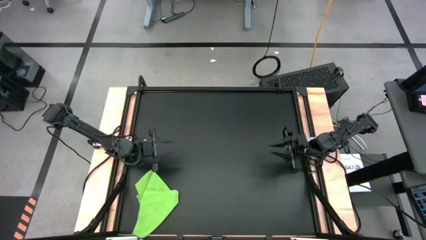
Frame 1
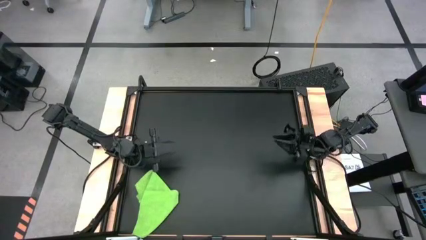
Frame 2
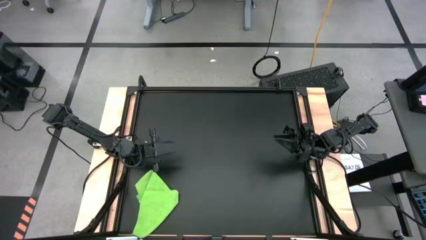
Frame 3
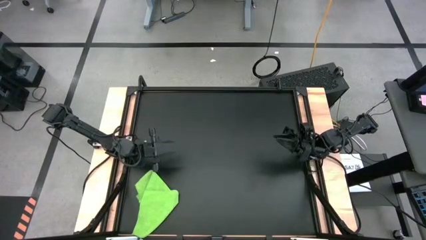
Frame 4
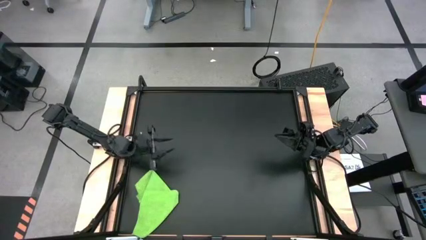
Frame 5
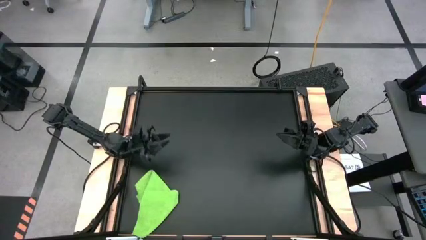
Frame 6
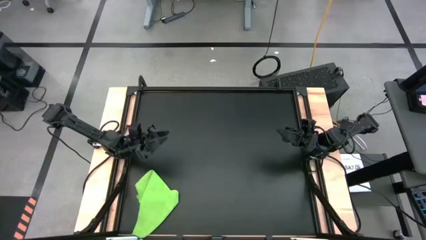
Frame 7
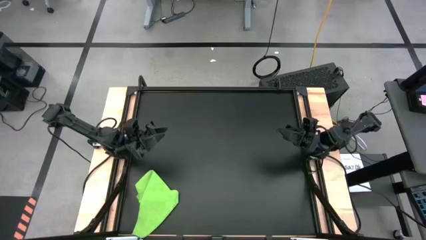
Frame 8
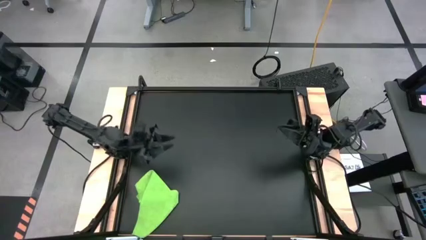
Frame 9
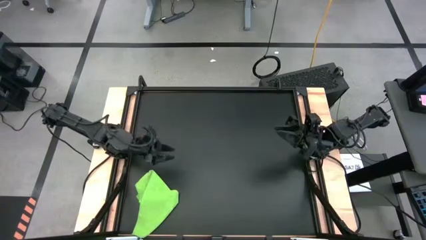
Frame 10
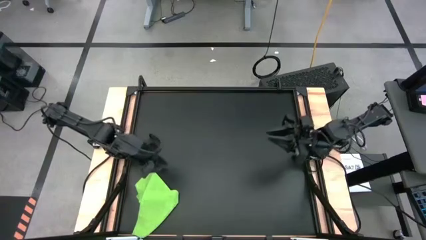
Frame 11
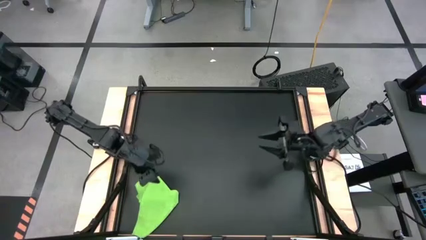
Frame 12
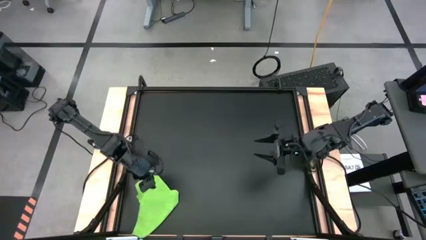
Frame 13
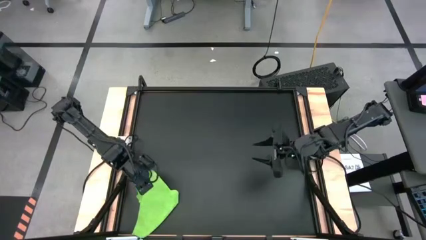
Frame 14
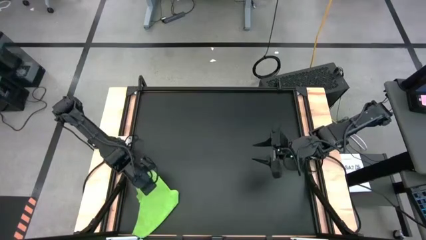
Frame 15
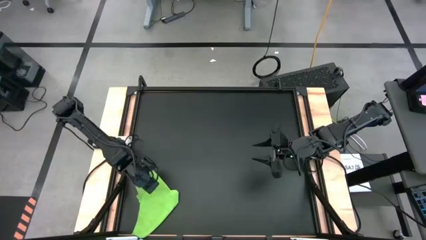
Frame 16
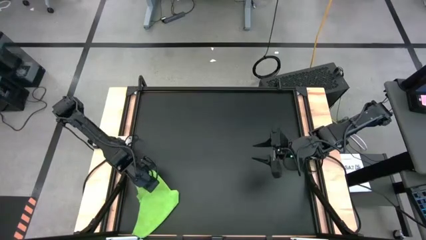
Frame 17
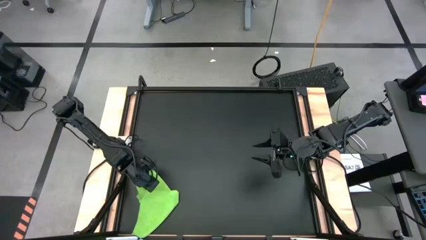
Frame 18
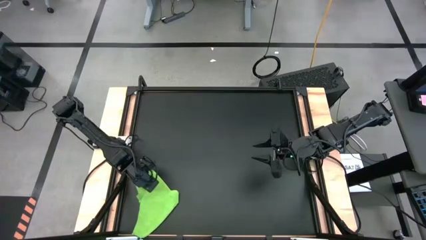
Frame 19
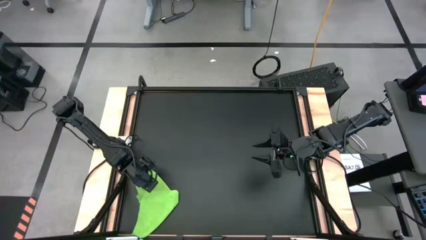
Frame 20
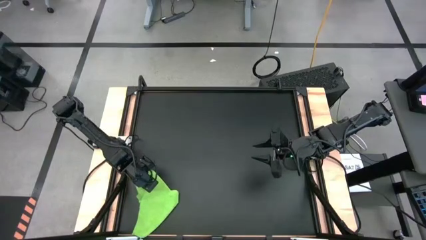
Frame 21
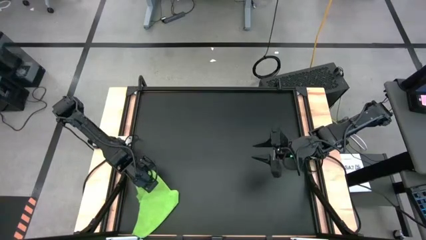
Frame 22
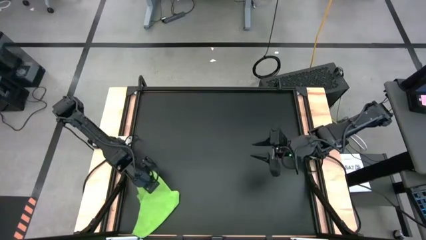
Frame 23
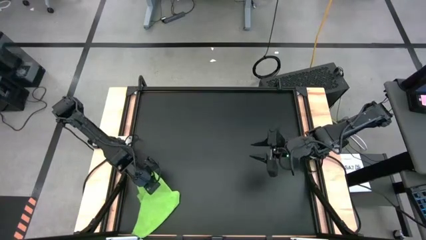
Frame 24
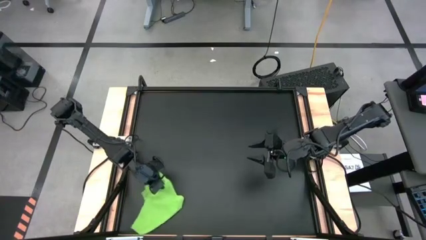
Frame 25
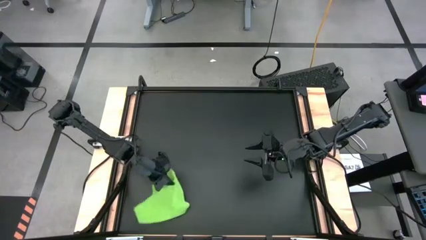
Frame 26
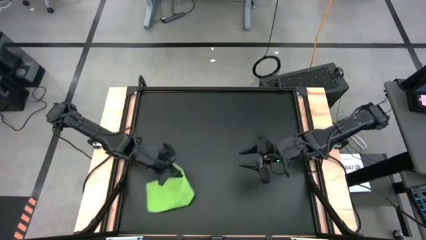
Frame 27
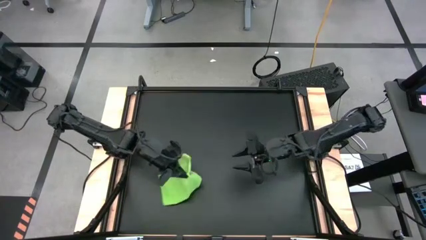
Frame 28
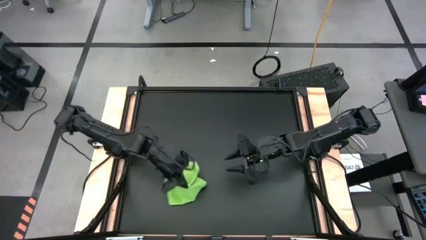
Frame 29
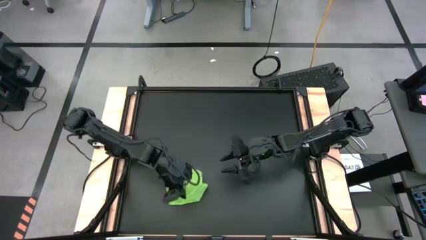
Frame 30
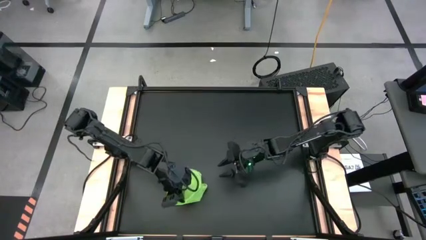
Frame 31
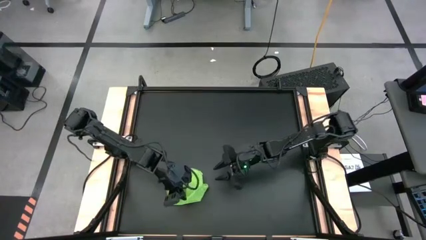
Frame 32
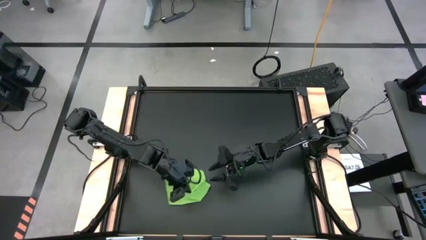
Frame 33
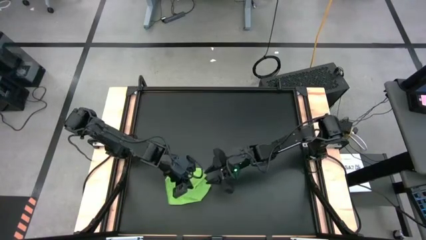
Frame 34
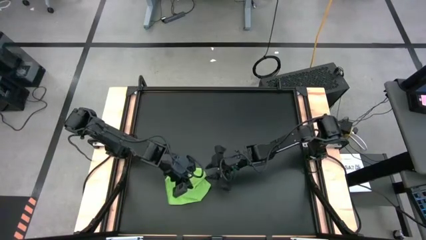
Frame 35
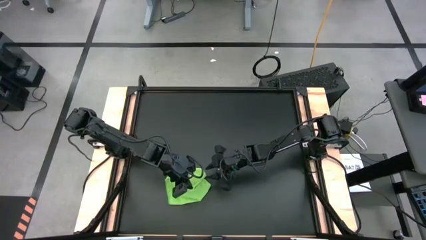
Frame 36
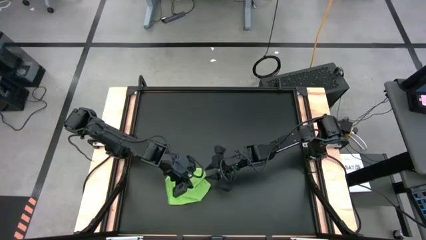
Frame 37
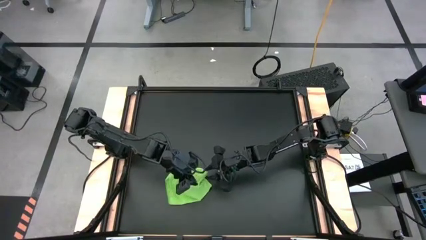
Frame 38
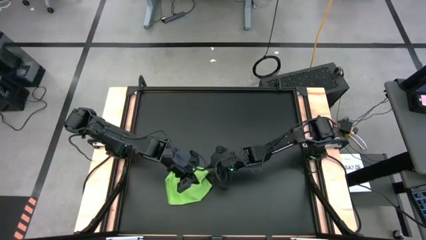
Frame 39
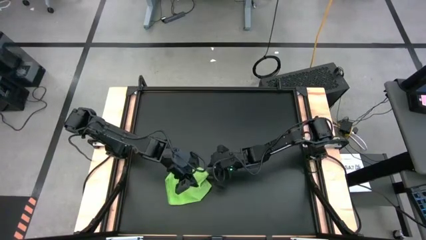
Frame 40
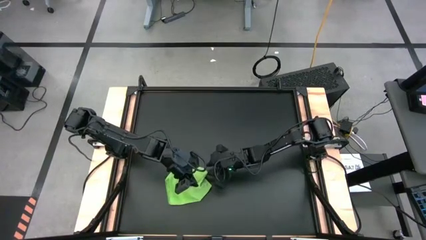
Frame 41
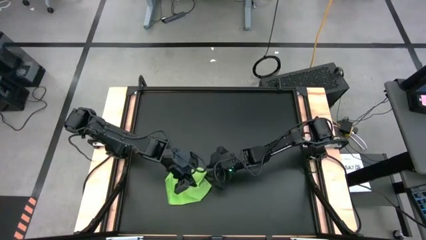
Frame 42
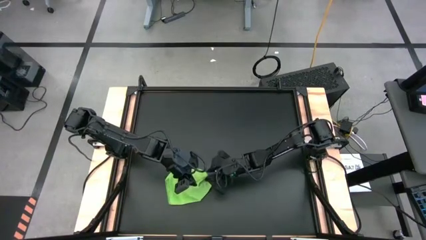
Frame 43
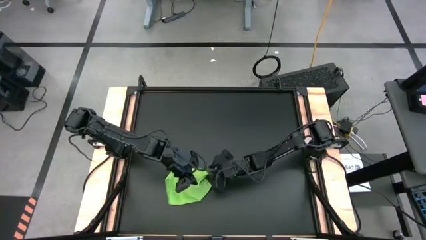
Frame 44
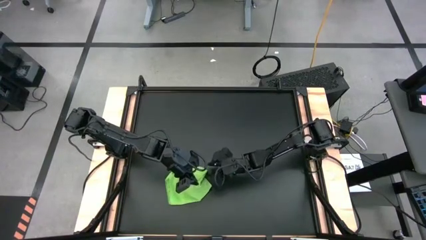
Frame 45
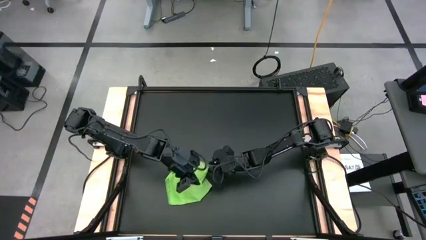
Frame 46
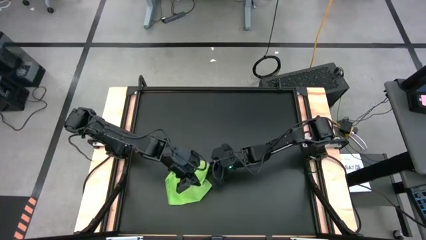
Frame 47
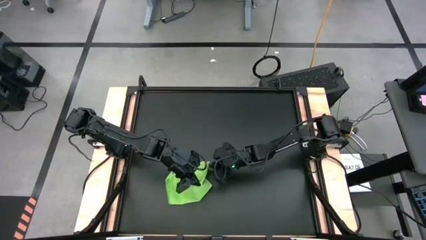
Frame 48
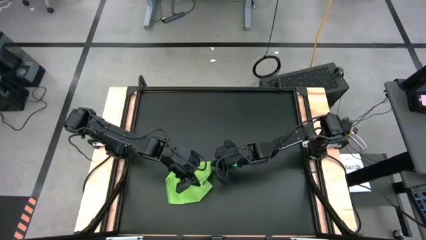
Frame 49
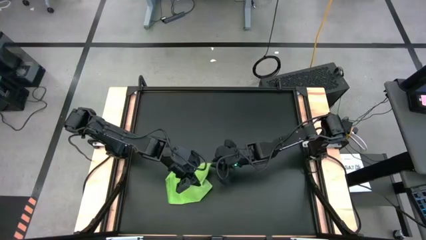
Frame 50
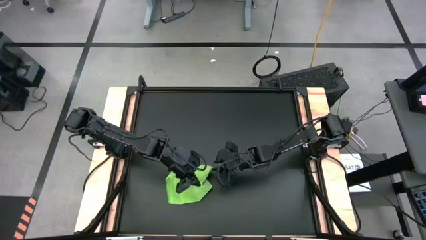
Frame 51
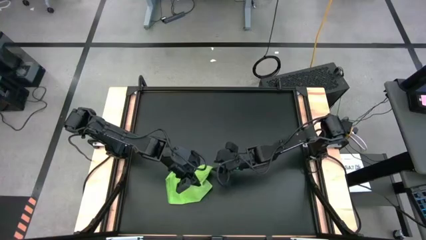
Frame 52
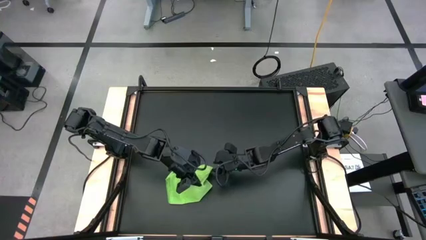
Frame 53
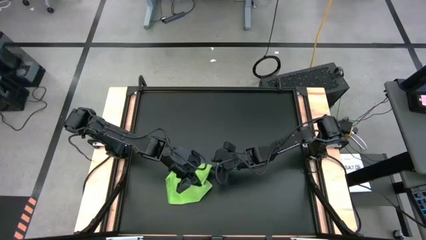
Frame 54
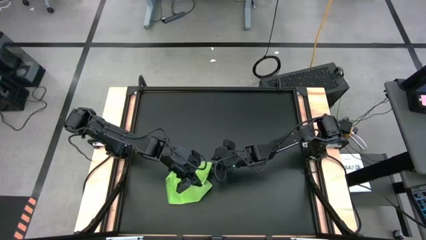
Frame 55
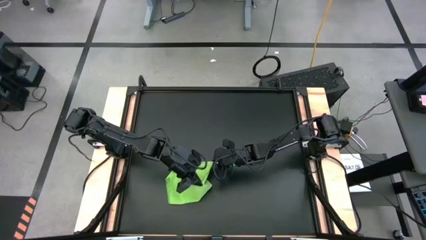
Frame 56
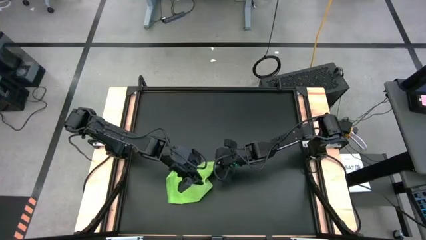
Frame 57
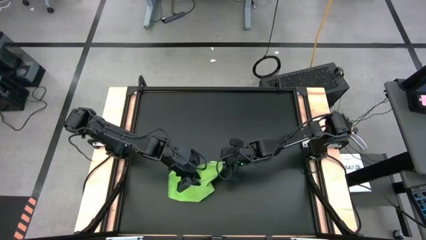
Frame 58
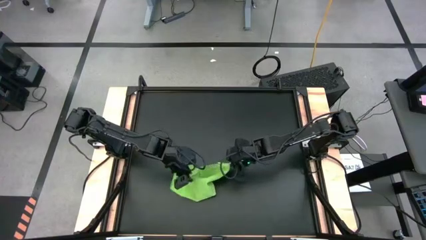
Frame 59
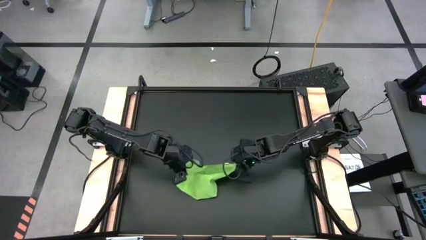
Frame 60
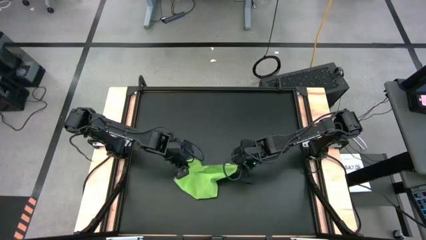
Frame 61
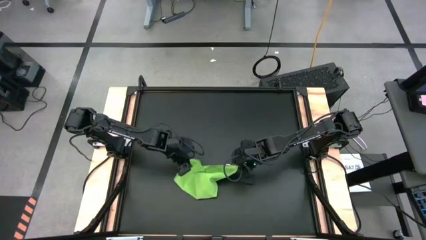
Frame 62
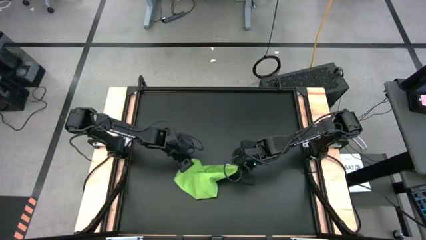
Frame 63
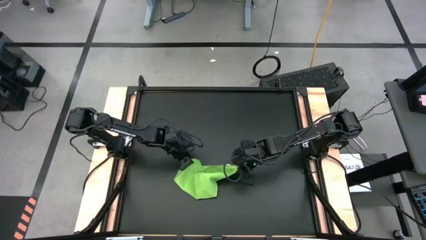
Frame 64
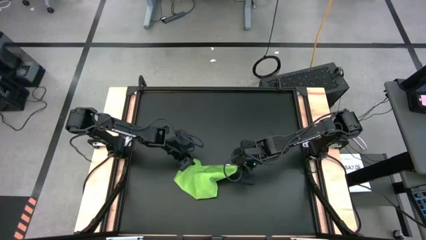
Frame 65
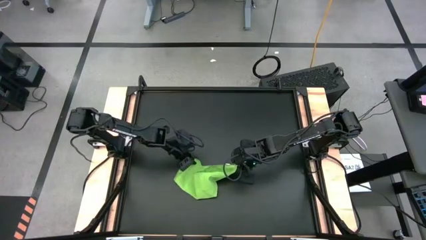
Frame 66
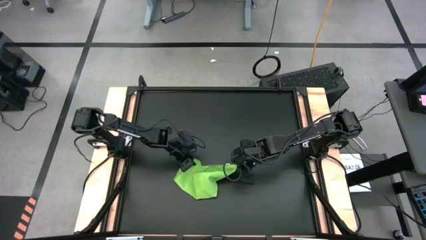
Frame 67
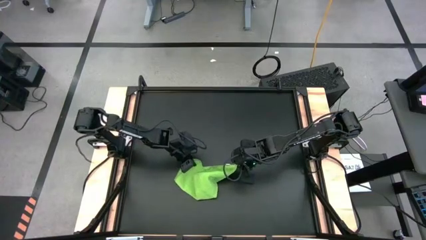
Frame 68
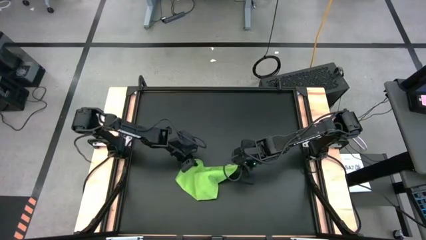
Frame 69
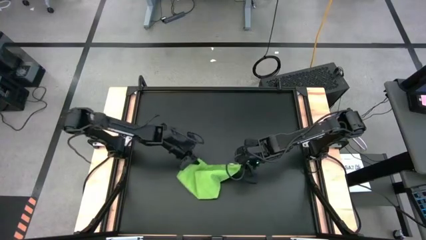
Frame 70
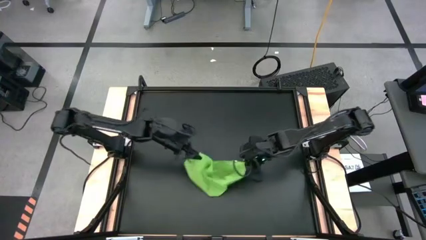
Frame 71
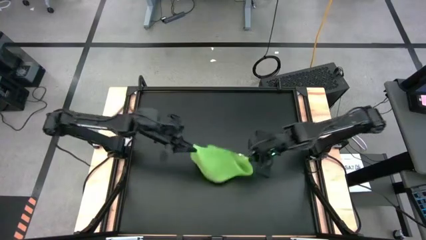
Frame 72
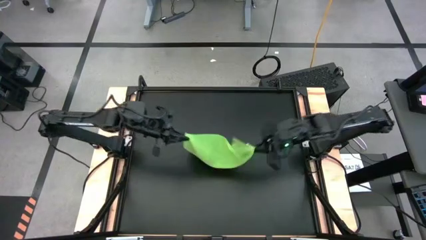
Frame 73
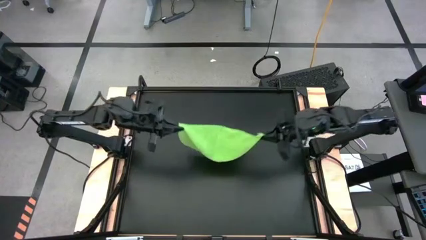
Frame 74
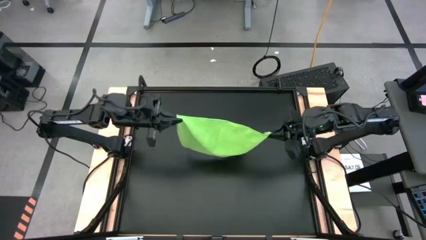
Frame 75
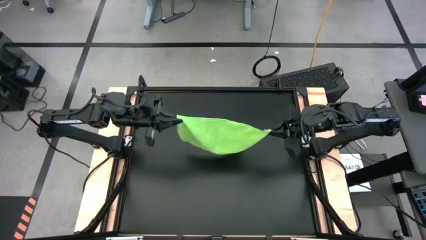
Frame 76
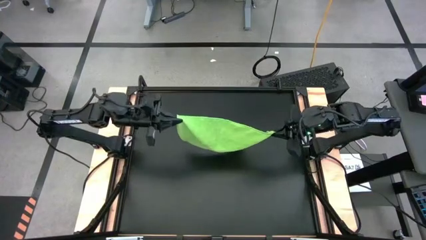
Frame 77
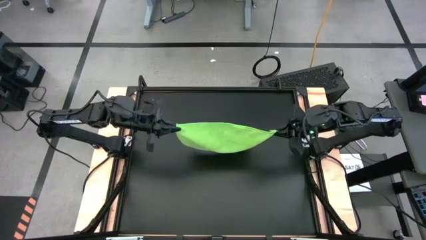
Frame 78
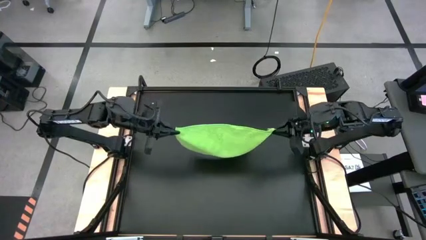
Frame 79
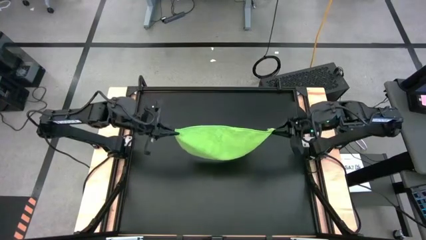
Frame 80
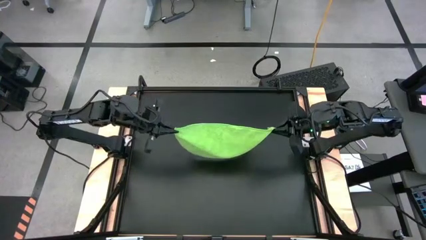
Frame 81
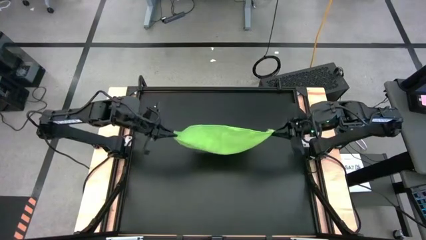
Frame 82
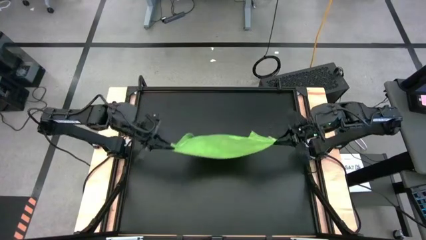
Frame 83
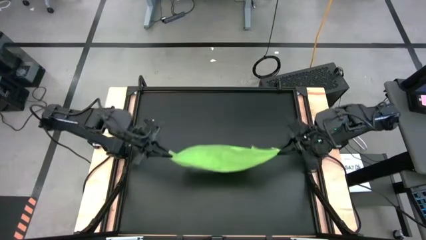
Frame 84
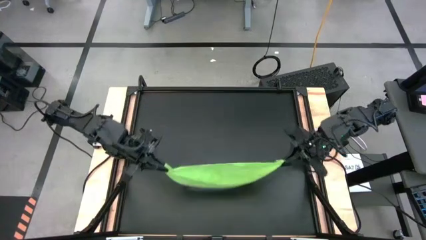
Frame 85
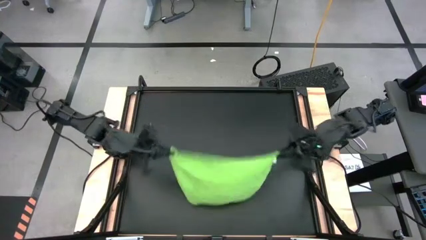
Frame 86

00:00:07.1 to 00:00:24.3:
Task: Roll towel into tight, uniform cylinder
Fold the green towel
